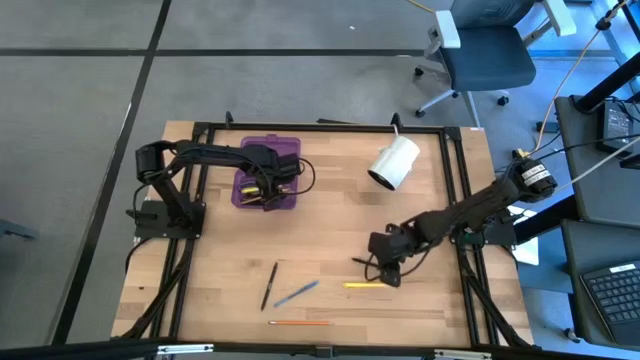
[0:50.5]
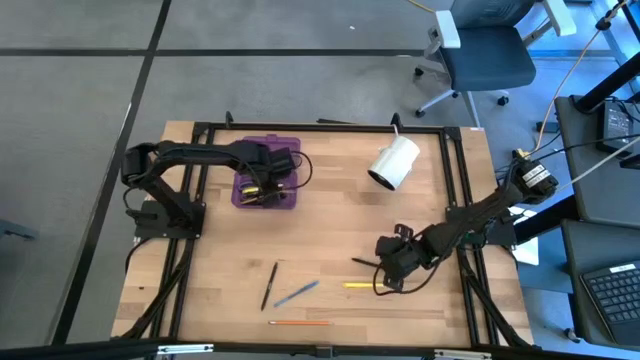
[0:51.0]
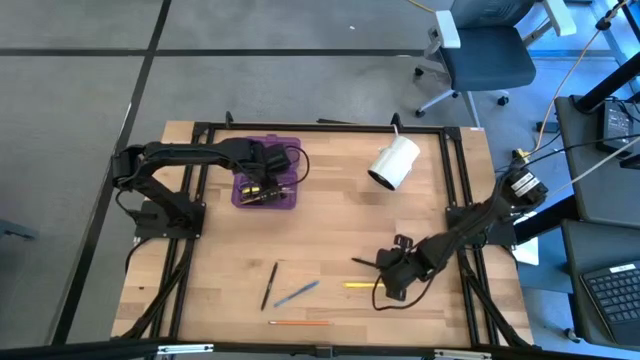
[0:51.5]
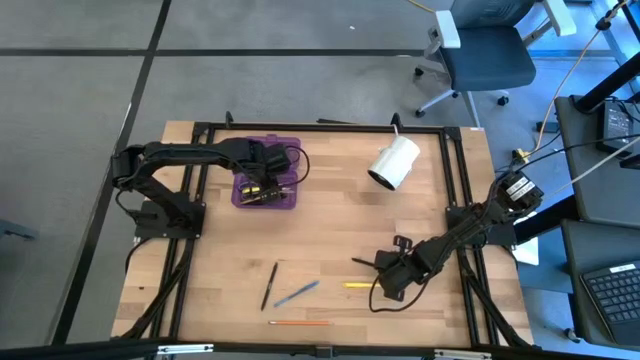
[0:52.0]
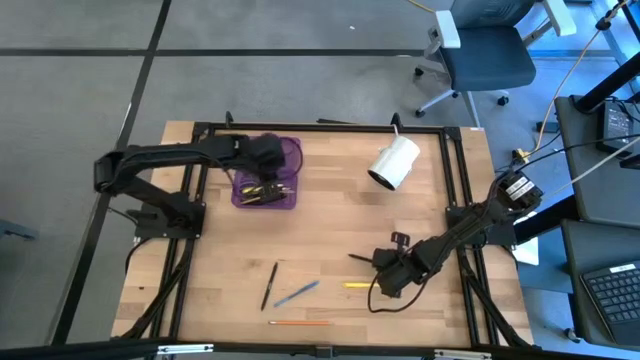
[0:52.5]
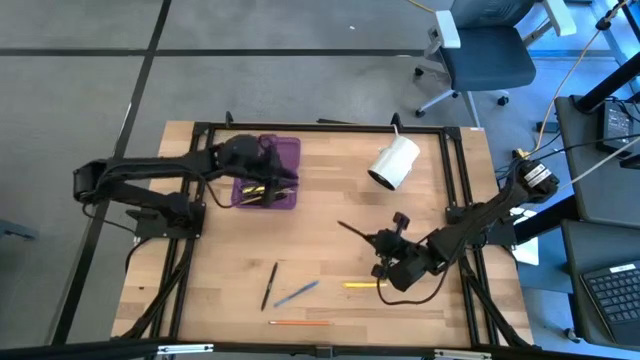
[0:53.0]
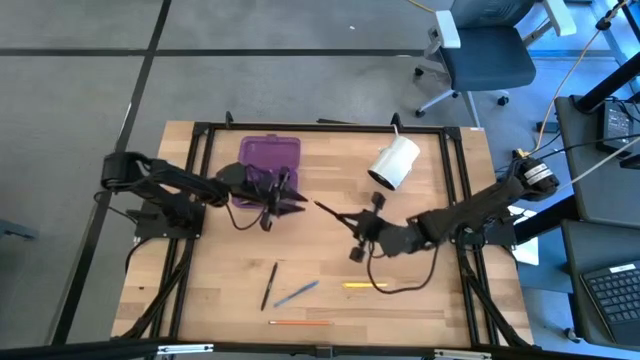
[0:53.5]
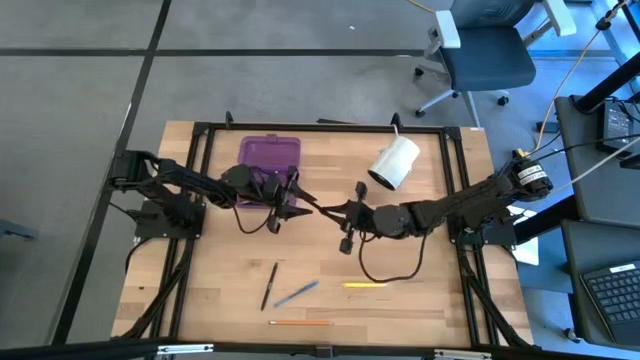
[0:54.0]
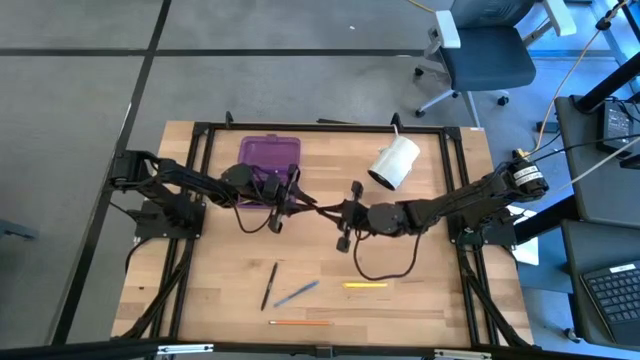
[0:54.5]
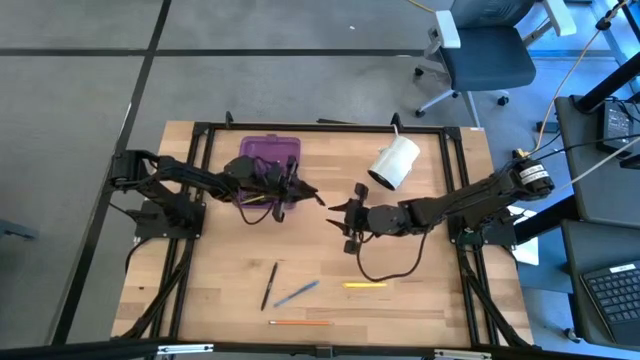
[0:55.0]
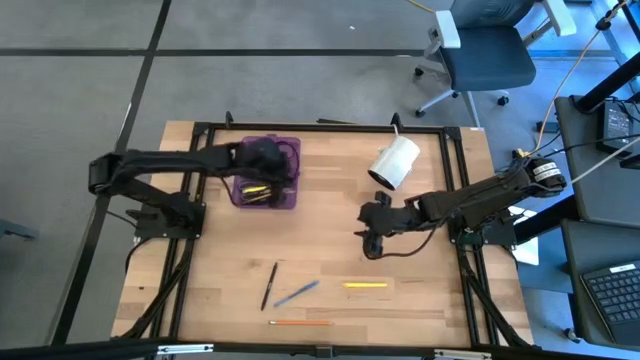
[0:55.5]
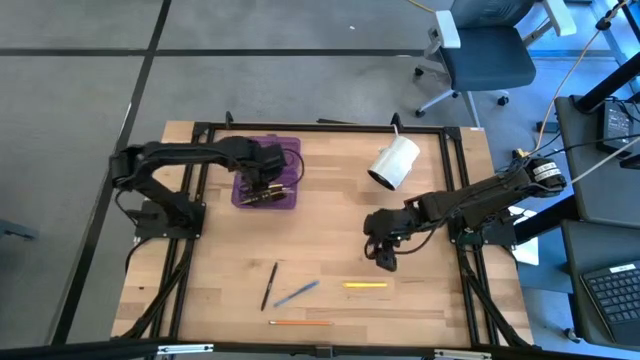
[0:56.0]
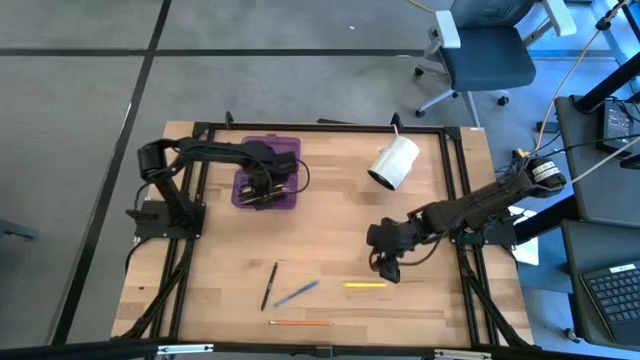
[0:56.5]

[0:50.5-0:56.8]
Task: Pick & place school supplies into a supply box
Put the black pen into the purple box organizer

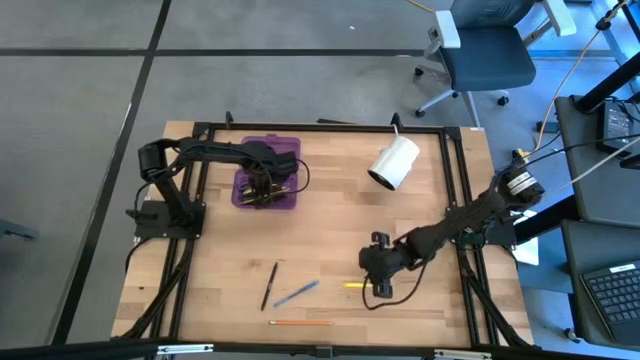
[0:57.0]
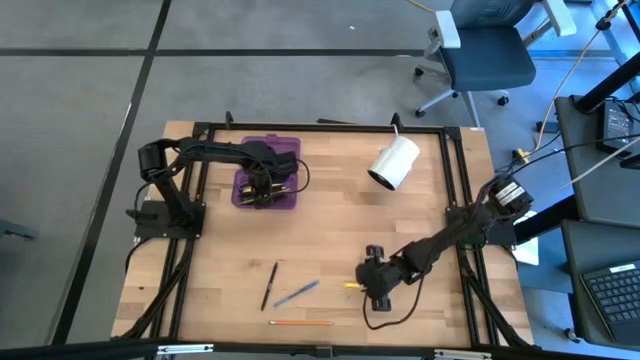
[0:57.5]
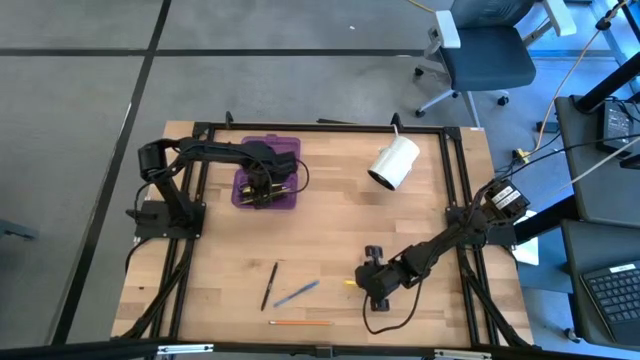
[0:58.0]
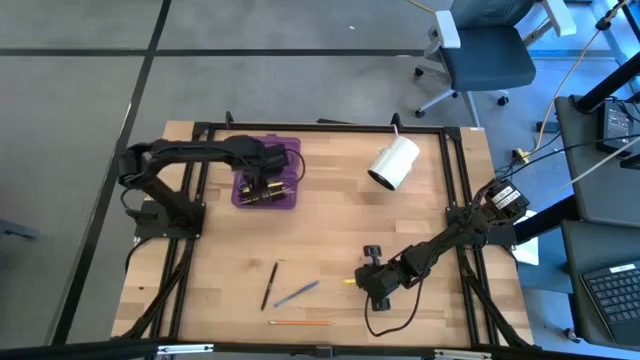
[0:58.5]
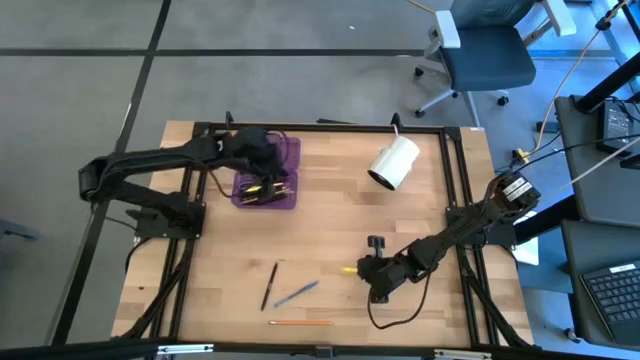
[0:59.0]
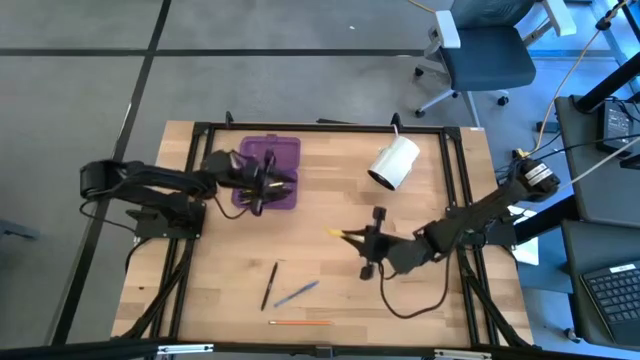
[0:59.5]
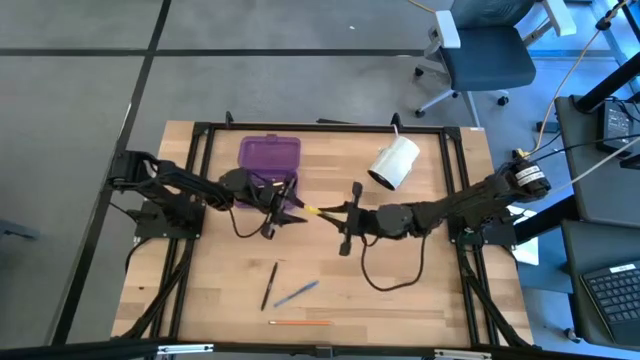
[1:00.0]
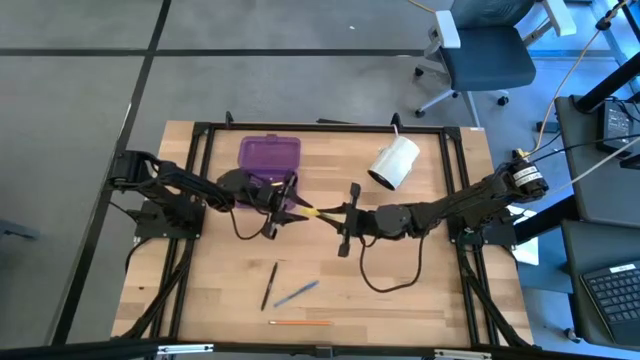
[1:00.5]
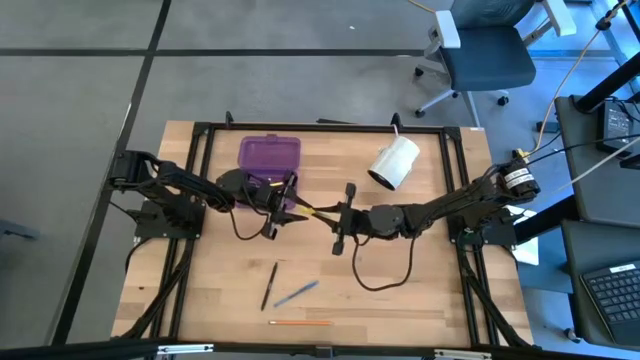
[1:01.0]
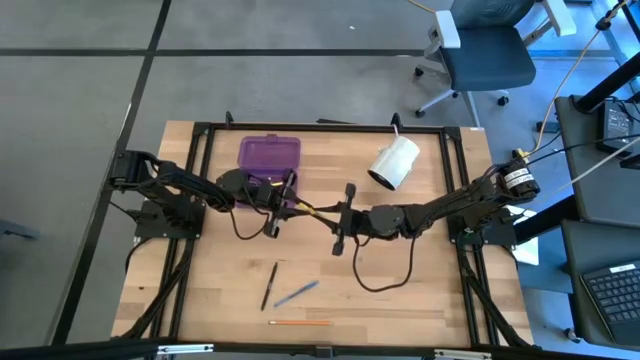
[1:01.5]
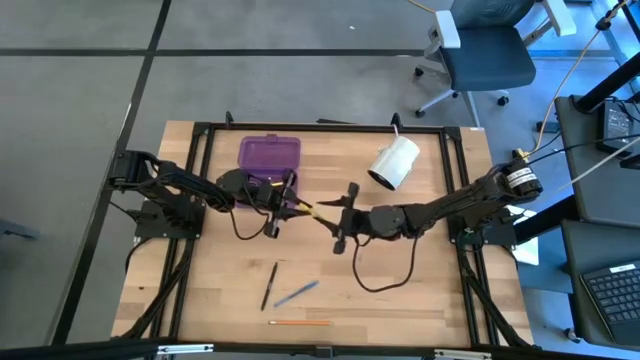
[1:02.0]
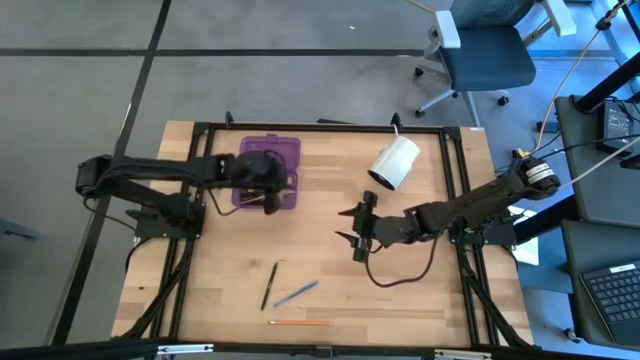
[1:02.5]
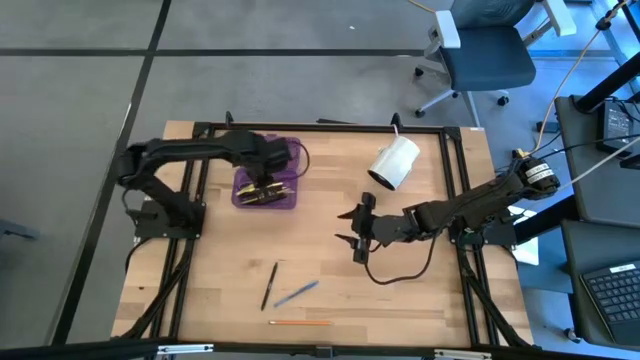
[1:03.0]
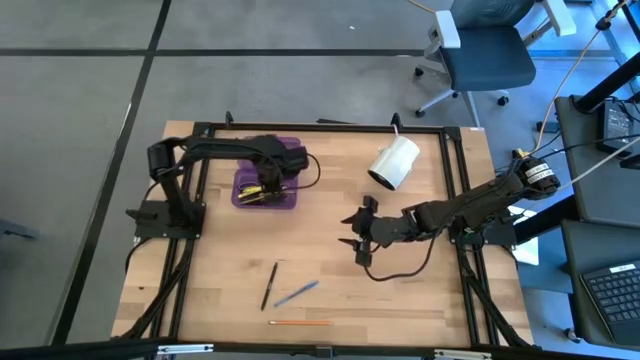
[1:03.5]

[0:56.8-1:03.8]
Put the yellow pen into the purple box organizer

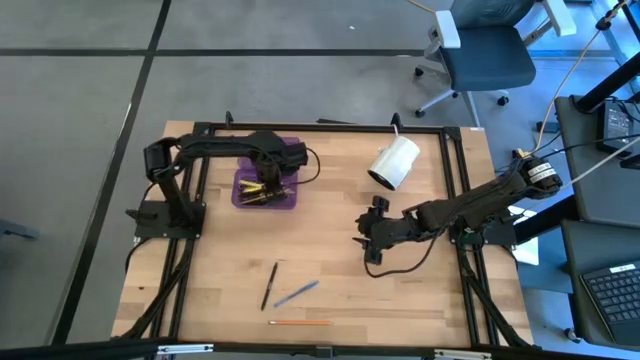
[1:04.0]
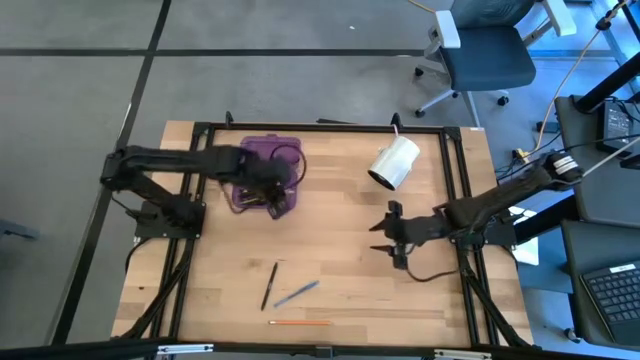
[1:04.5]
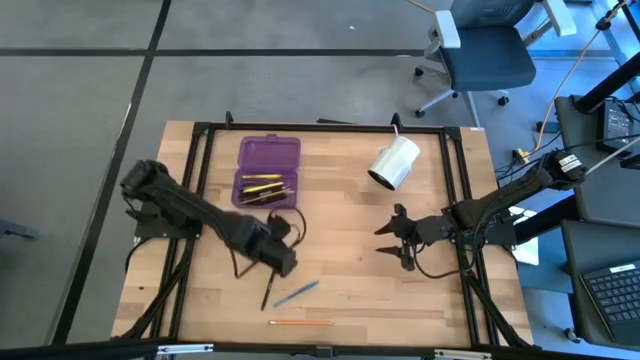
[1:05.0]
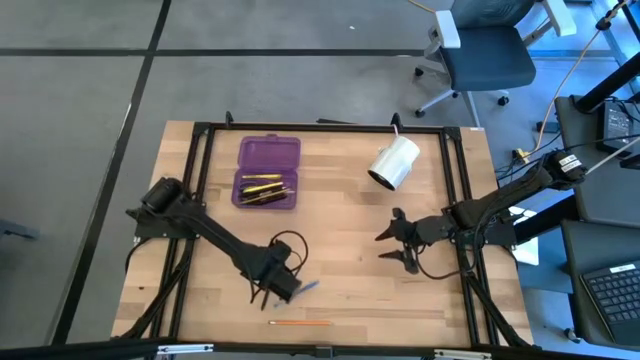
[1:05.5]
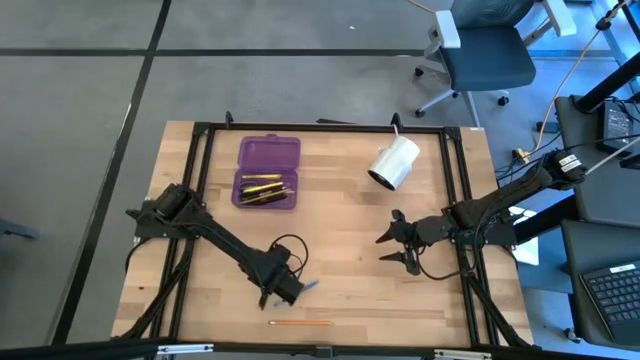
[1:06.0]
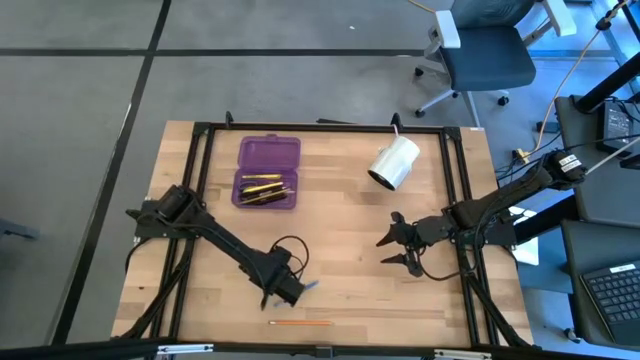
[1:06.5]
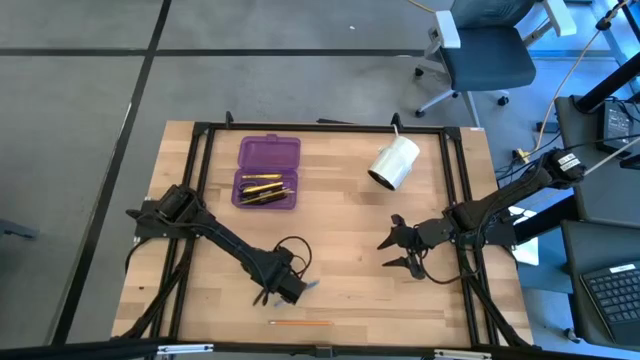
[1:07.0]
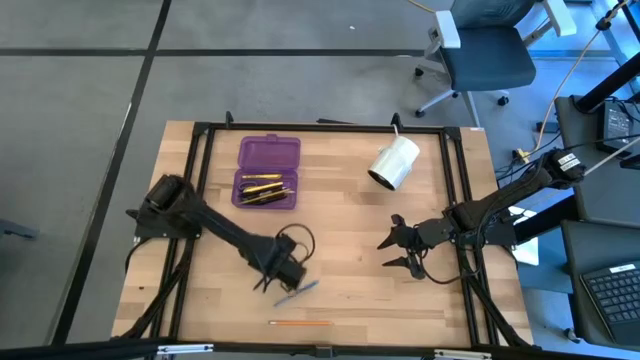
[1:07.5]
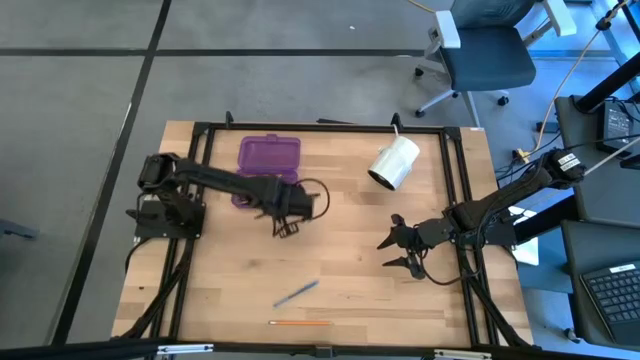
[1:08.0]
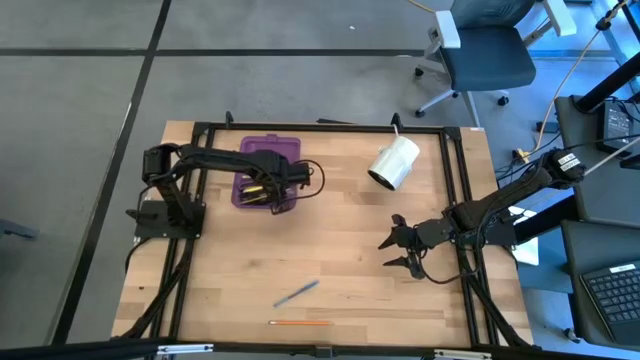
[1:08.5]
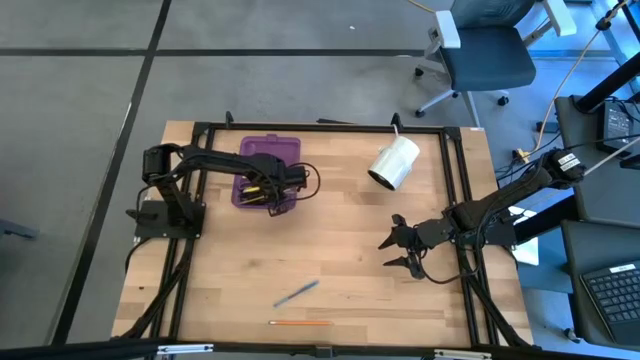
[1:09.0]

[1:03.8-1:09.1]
Put the black pen into the purple box organizer

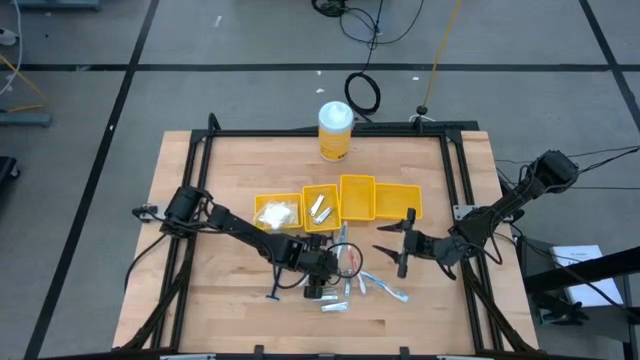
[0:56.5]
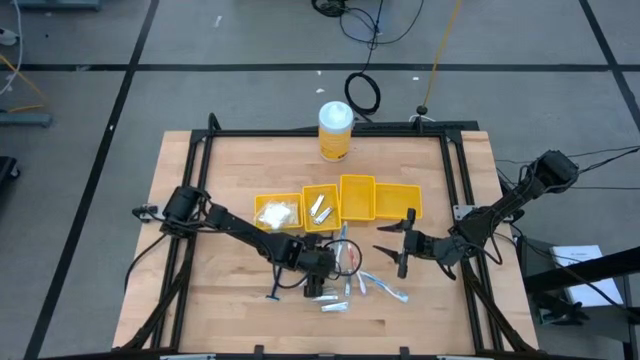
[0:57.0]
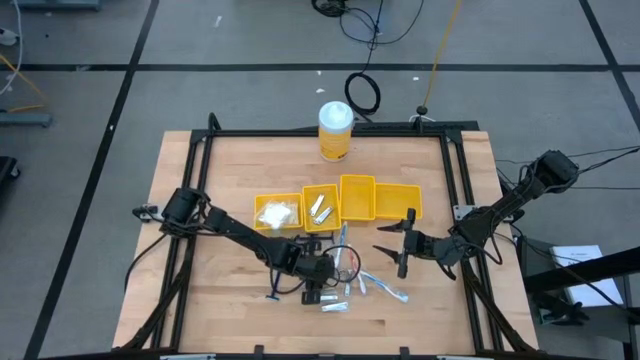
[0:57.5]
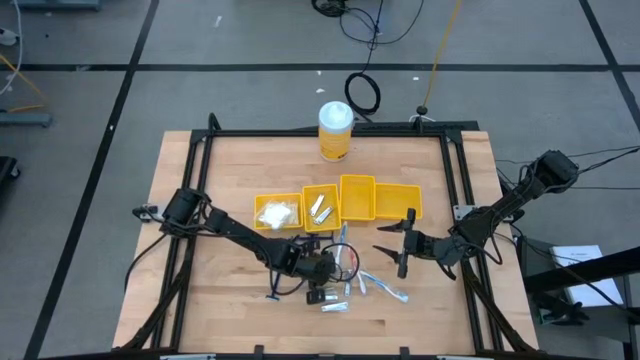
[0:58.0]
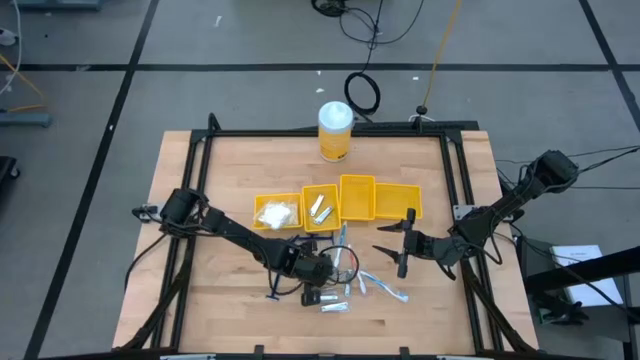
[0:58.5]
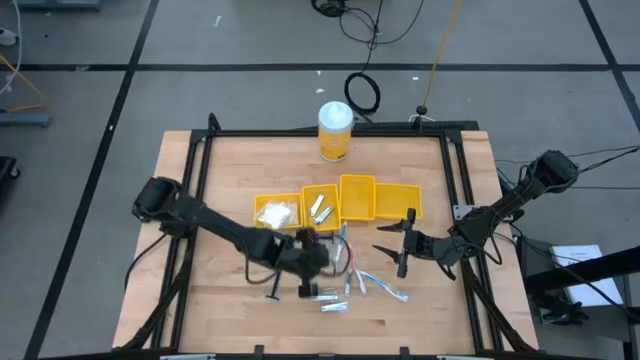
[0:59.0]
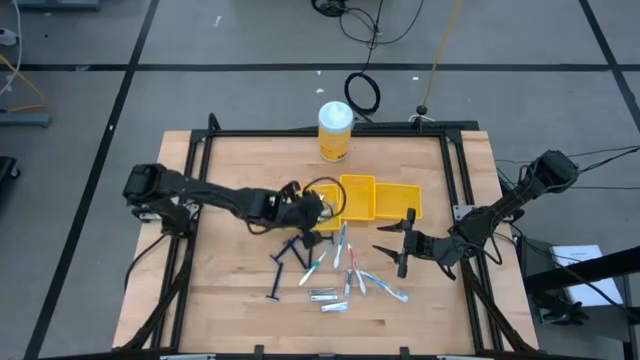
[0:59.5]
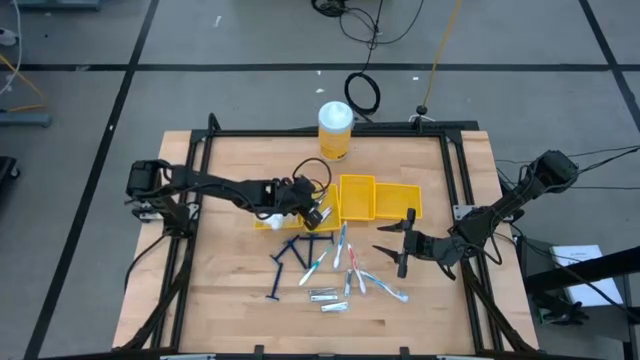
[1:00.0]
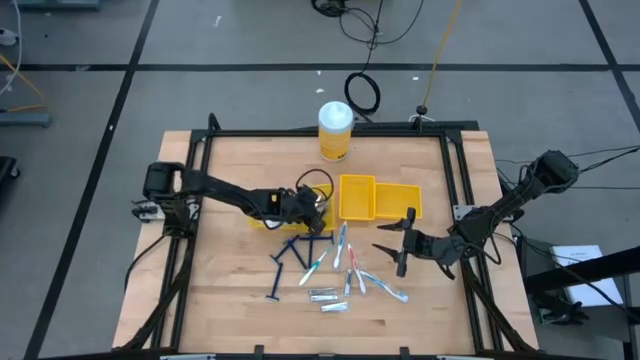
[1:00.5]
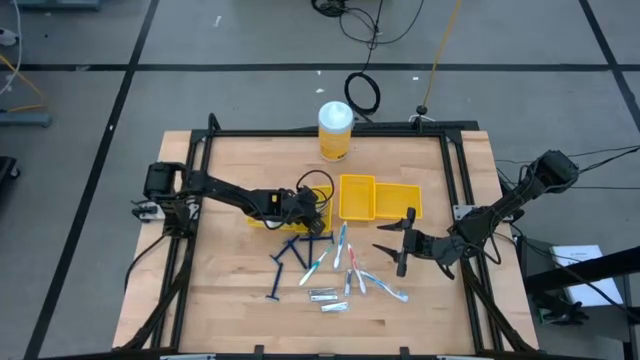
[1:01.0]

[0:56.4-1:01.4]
Task: Pick & Place Travel size toiletries
Put the silver nail cutter into the middle left yellow bin
